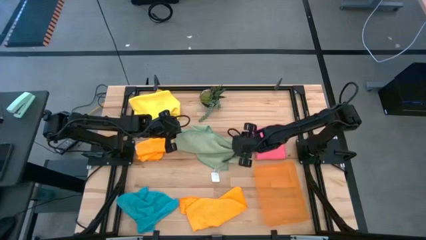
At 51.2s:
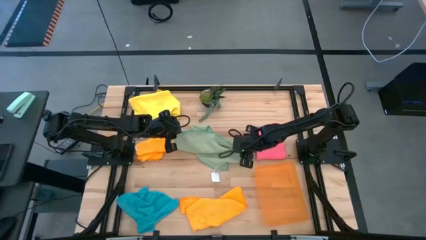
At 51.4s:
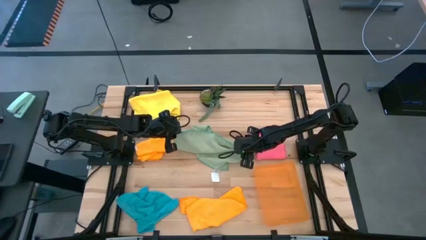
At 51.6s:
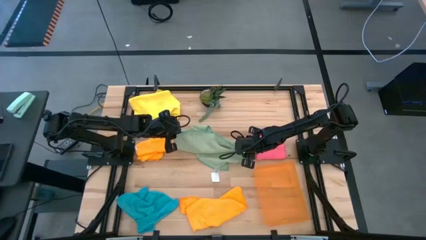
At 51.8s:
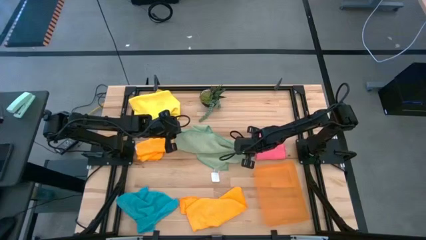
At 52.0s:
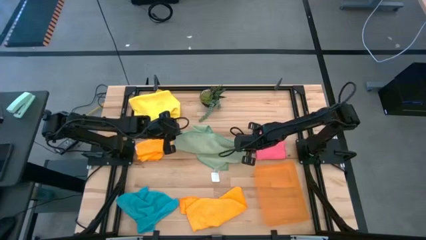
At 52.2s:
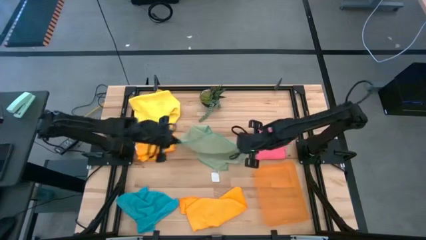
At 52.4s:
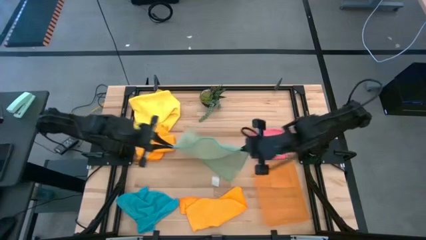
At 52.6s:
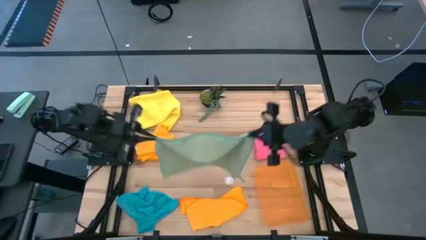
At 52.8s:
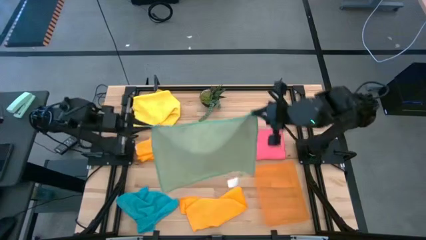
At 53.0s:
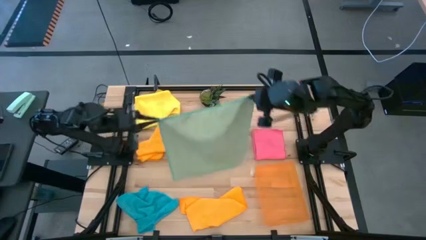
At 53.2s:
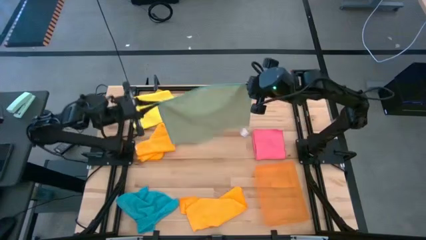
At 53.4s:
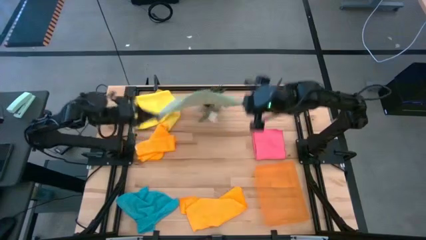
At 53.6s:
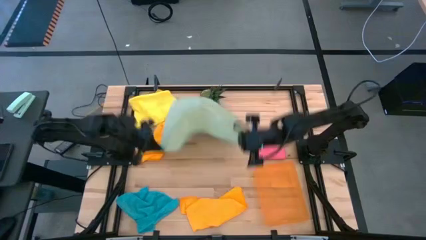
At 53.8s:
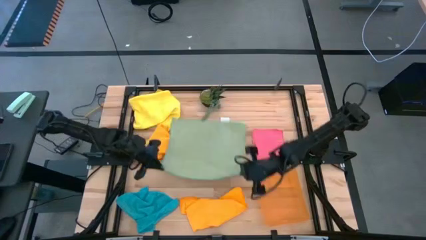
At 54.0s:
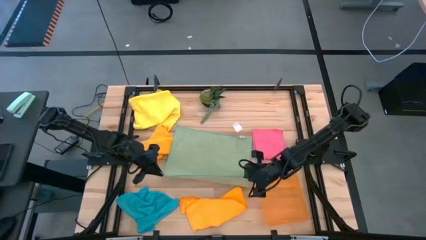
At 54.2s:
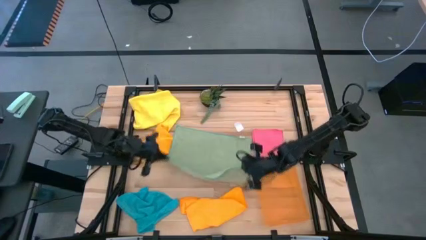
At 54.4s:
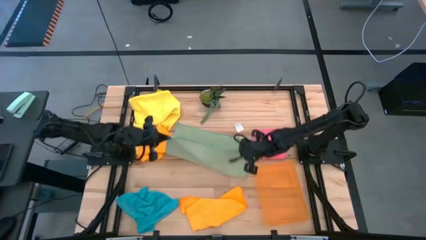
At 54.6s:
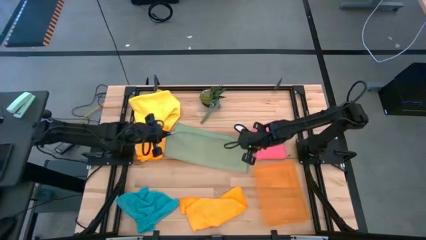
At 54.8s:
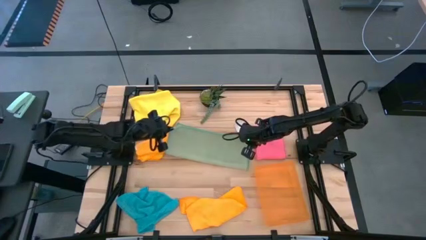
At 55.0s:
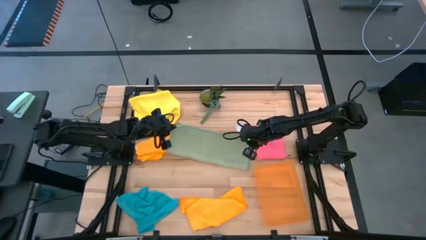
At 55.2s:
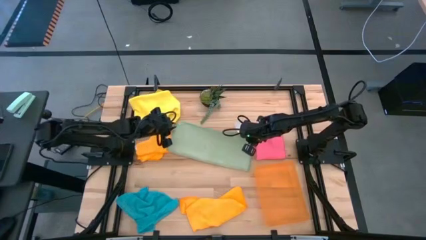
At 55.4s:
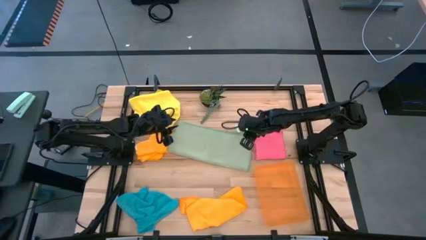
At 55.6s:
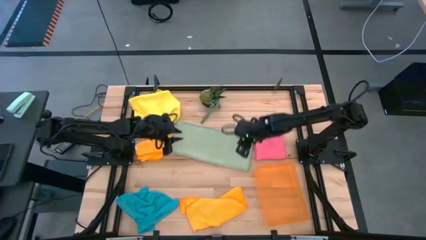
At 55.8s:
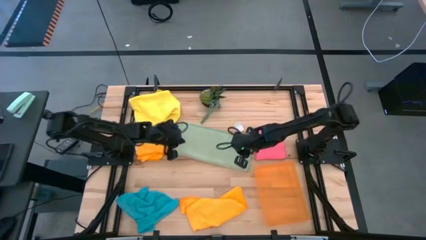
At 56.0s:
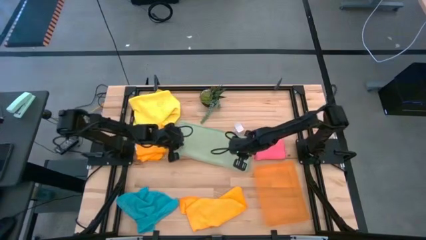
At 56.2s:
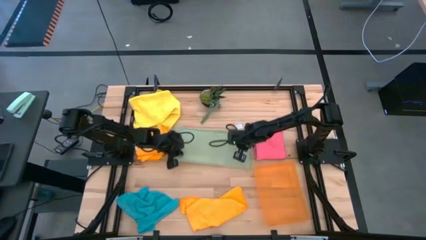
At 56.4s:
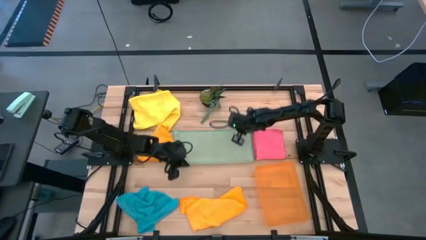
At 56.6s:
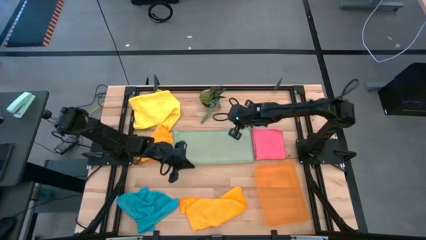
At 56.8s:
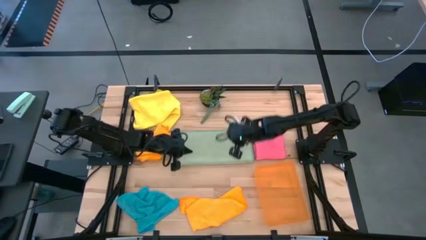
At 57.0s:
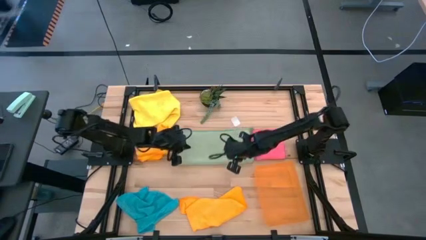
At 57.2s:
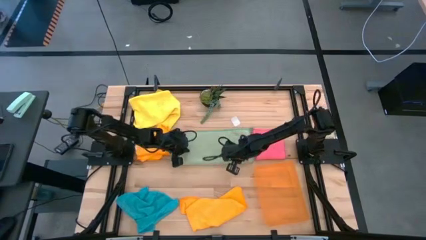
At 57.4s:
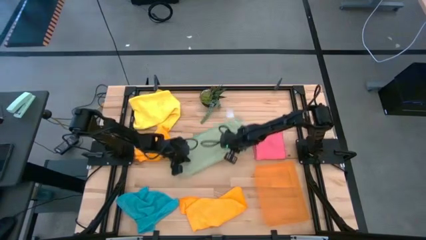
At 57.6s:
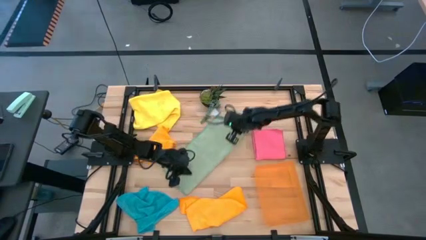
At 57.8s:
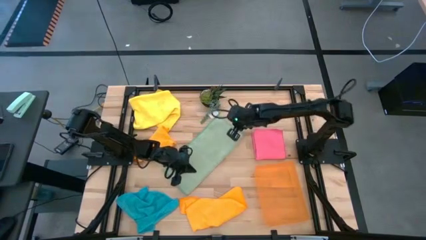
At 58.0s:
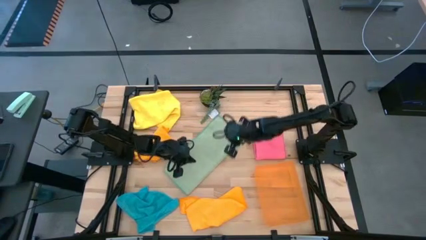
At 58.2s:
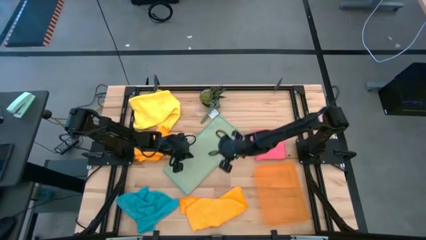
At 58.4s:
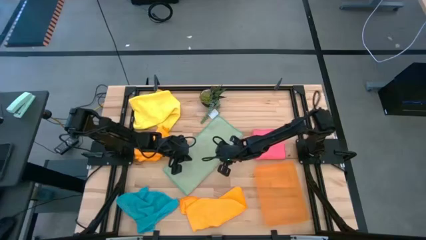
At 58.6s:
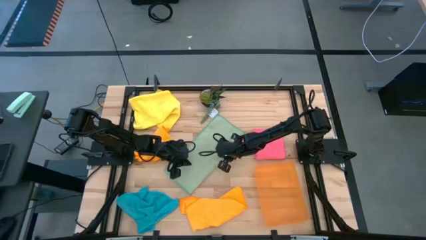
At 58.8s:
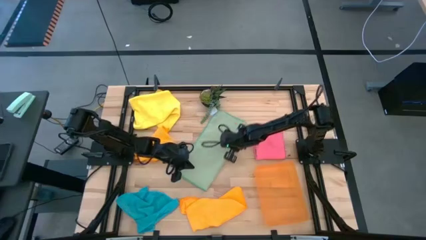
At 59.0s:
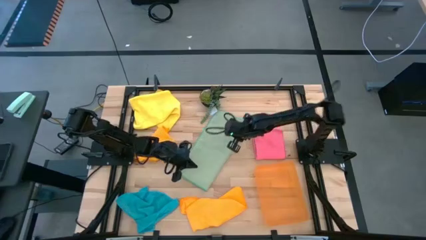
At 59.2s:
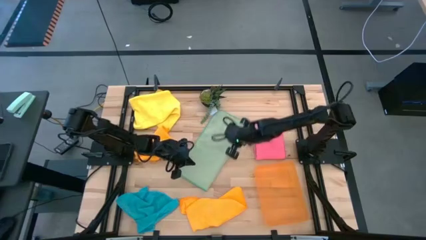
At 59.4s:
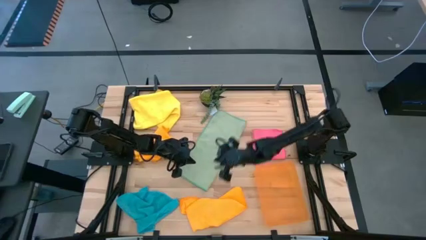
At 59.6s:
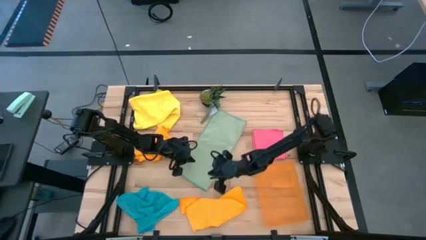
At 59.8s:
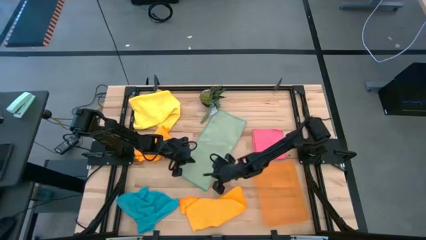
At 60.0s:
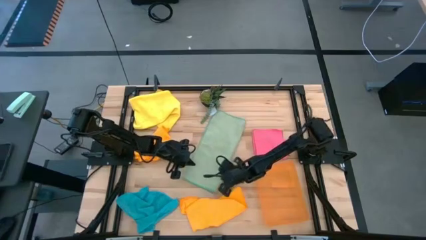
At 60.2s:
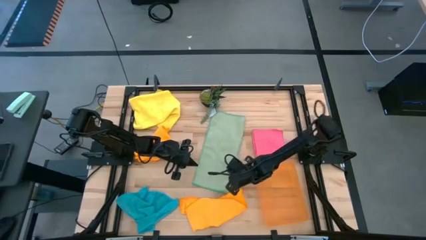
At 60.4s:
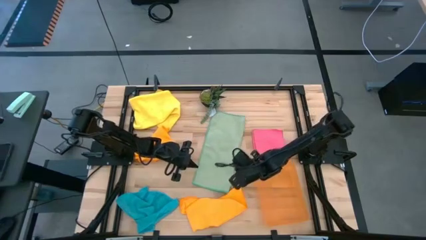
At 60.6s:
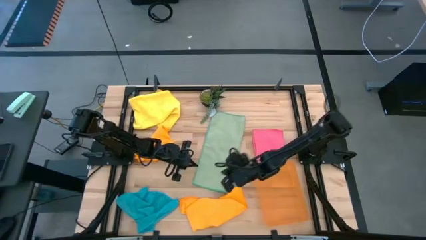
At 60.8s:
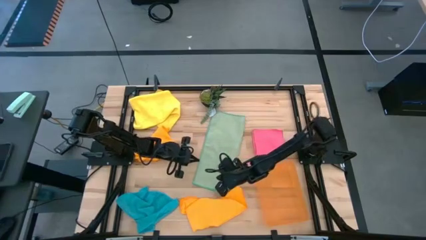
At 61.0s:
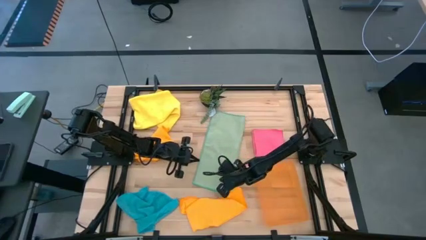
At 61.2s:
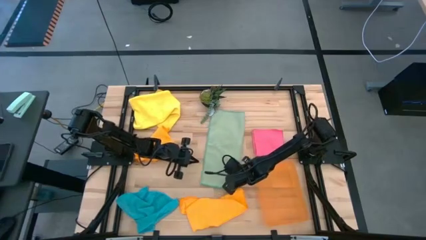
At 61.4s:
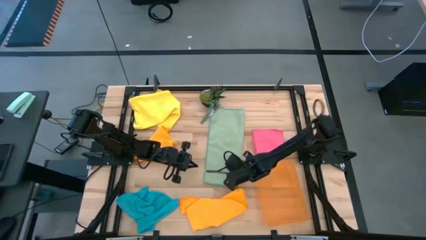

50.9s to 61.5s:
Task: Fold microfiber towels
Fold the green microfiber towel

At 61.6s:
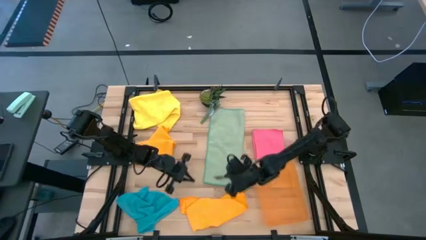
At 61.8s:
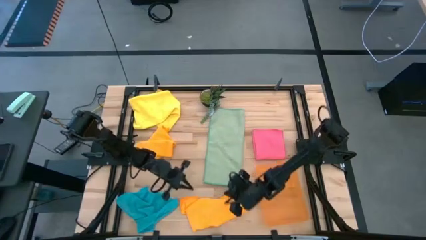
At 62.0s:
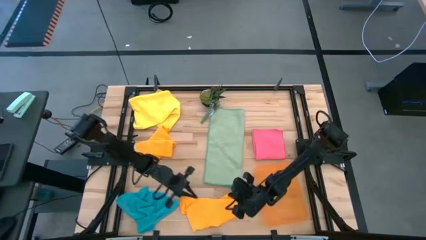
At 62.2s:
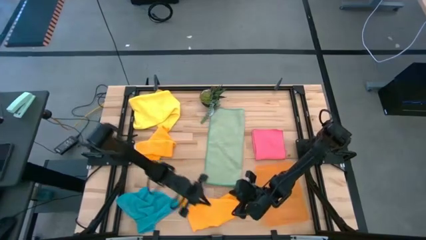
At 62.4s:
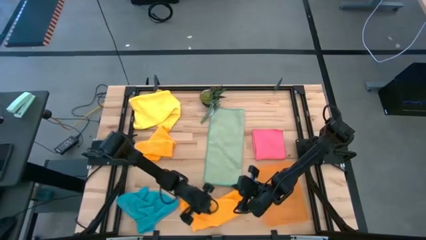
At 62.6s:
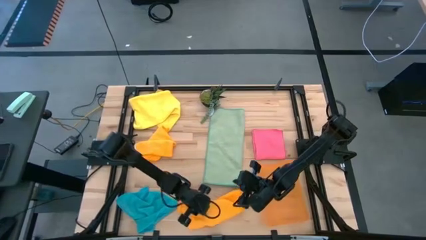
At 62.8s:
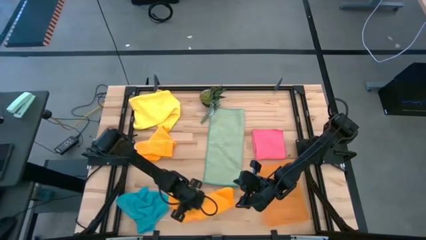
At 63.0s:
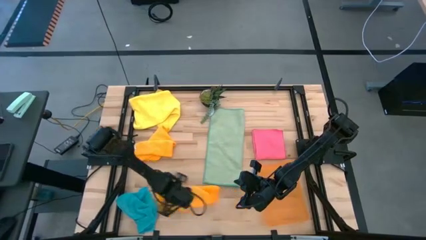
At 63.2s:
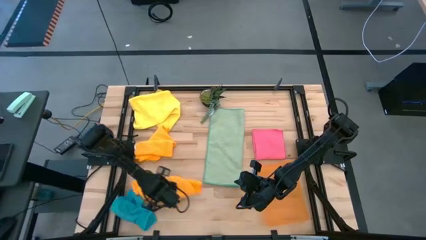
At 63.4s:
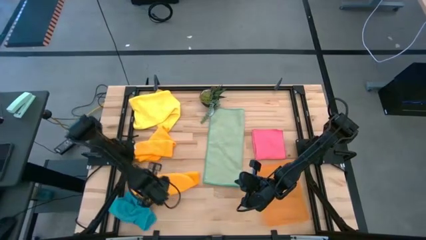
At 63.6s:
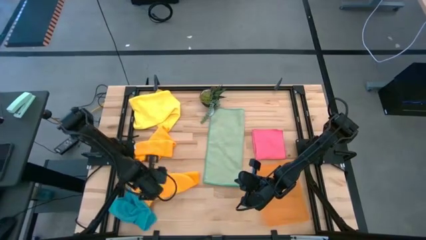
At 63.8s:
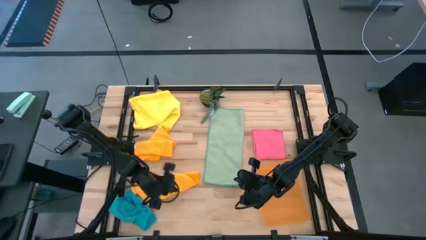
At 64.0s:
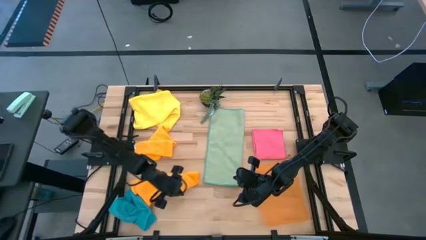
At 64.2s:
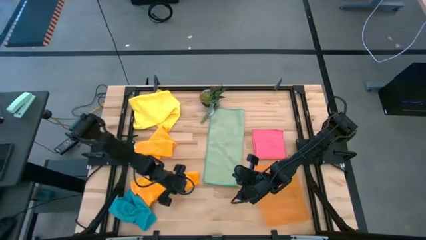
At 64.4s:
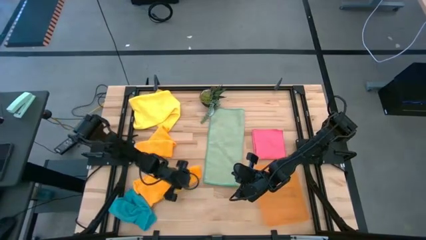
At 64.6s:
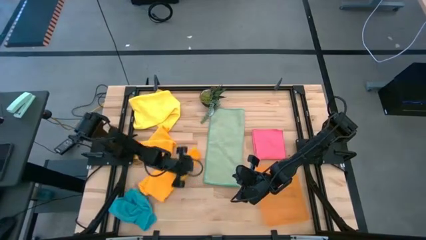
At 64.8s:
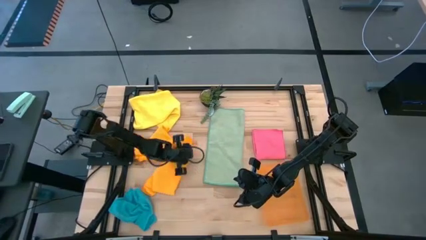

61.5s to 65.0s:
Move the bottom orange towel to the left of the green towel

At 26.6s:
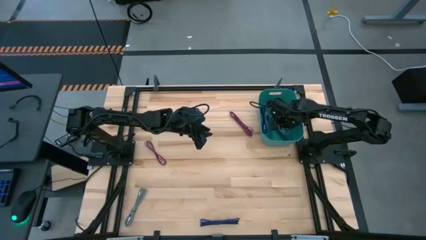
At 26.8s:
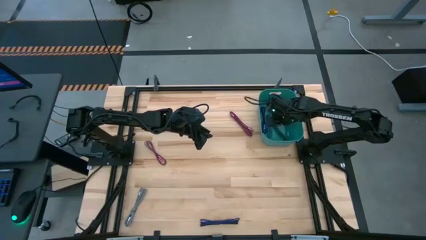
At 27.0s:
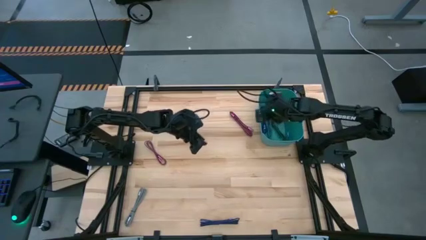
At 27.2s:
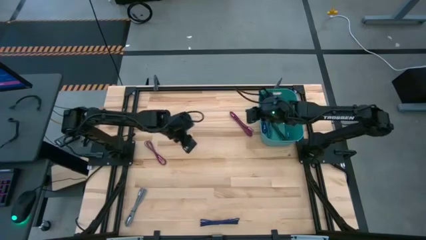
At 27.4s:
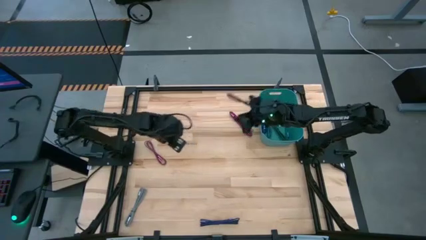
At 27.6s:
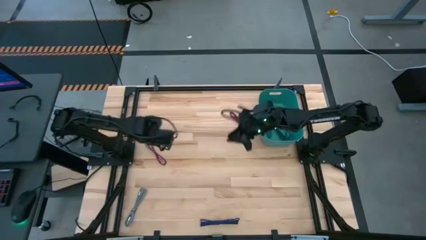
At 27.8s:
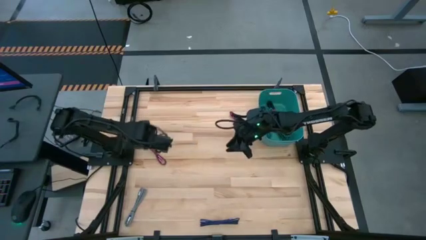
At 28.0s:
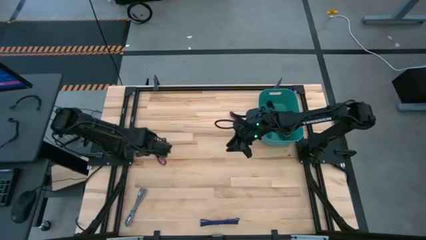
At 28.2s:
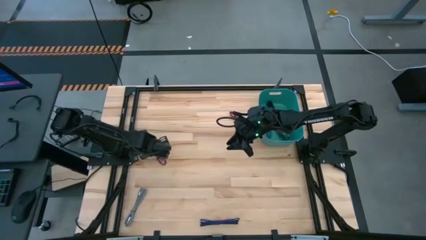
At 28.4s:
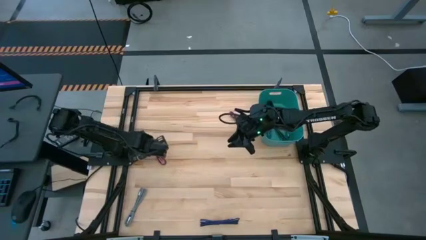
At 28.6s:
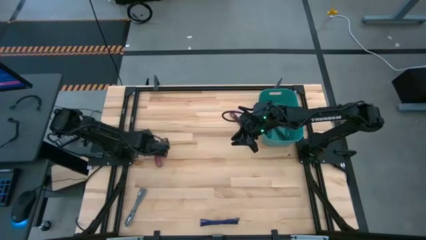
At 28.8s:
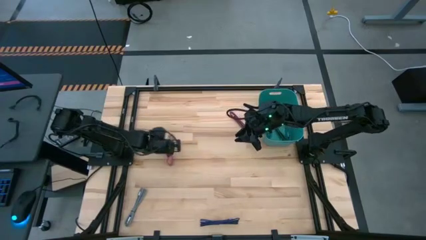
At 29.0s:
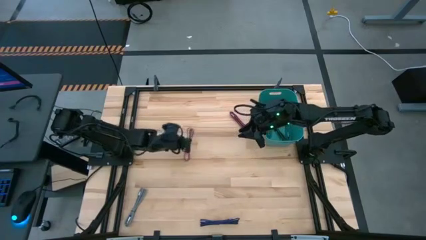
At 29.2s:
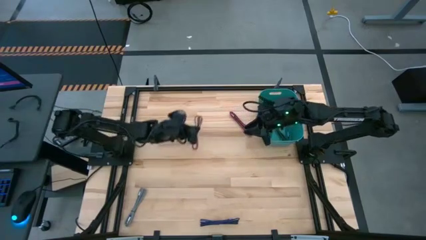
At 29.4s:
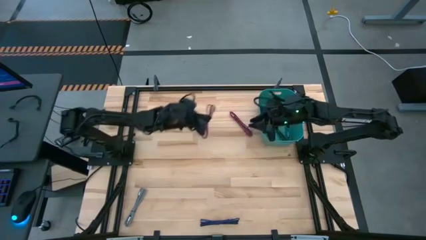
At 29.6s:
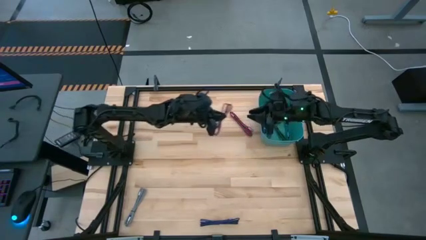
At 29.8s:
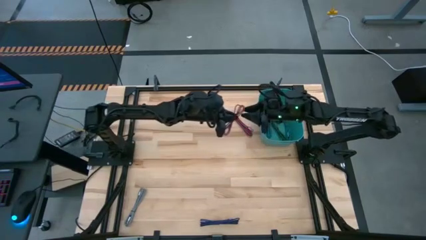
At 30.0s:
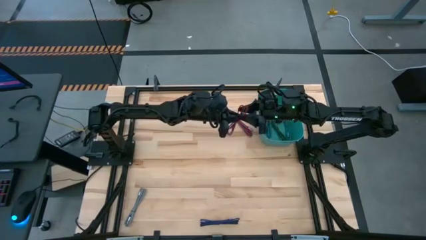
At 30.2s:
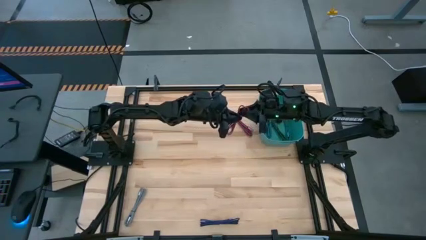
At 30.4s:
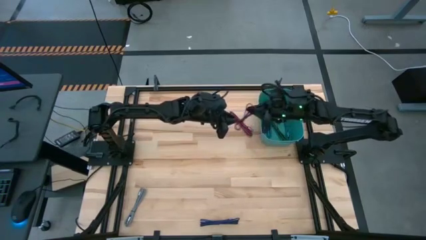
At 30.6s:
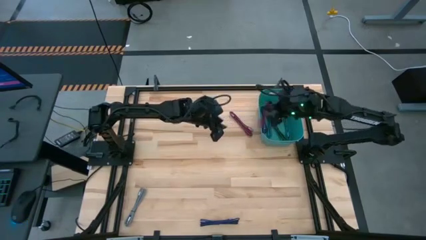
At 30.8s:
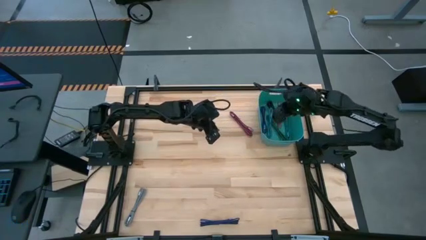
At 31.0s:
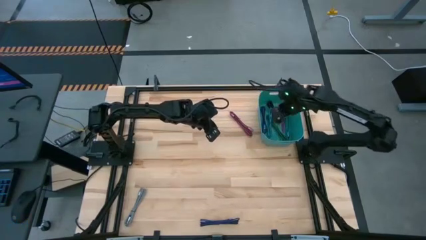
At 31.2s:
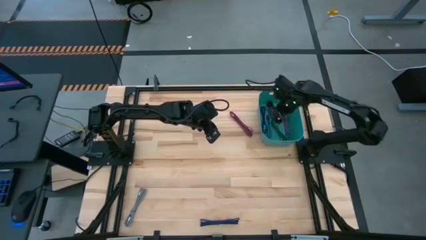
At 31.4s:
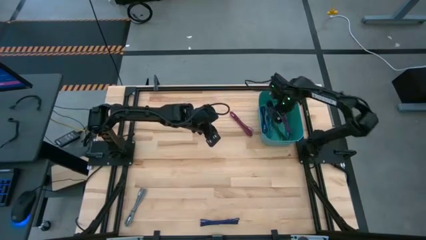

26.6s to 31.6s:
Task: Pick and place USB-C Cables
Put the left pink charger cable into the green bin
